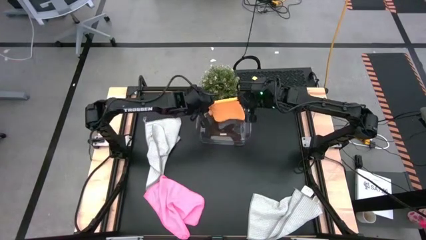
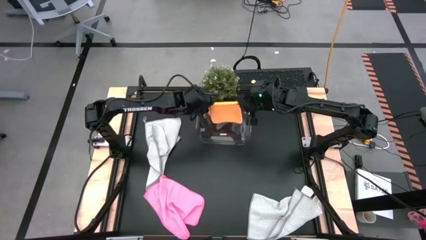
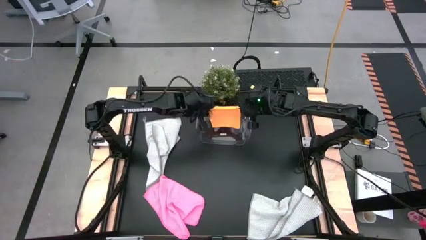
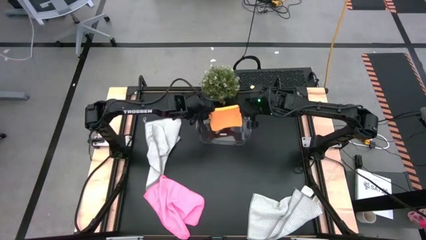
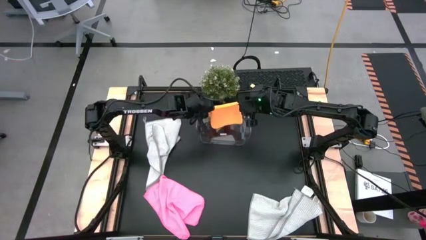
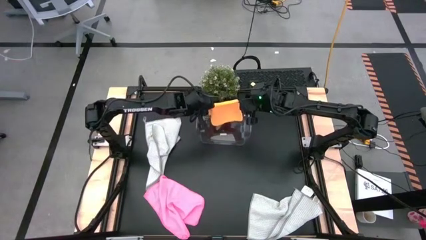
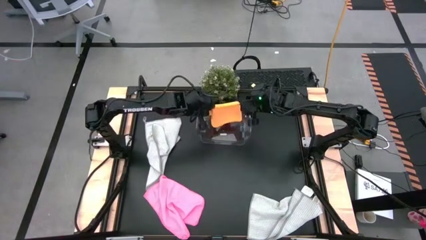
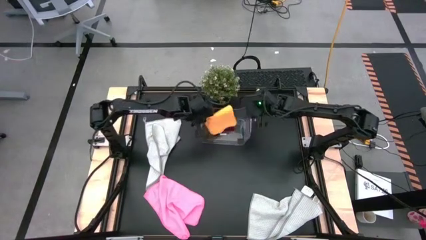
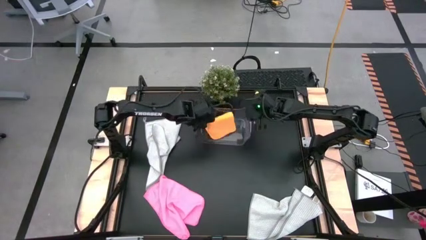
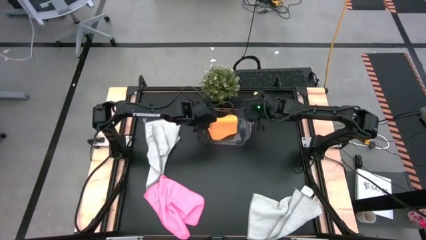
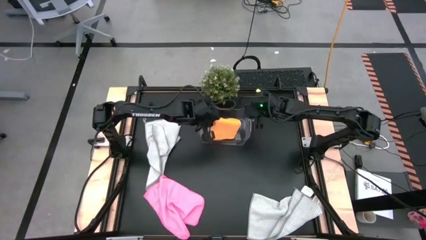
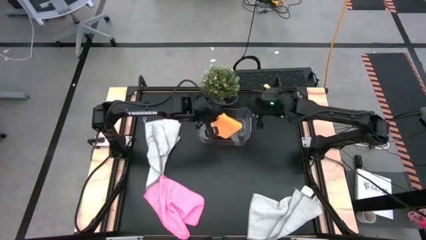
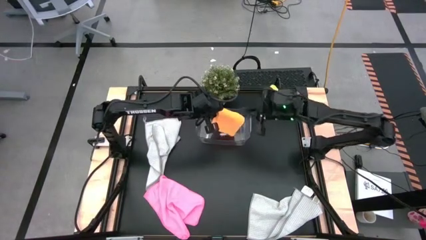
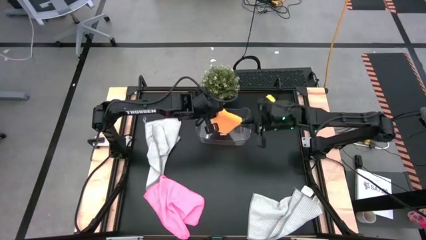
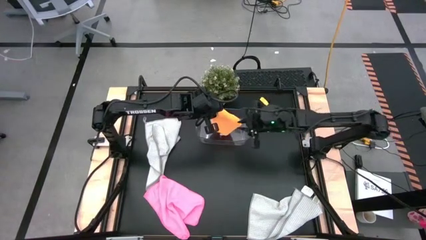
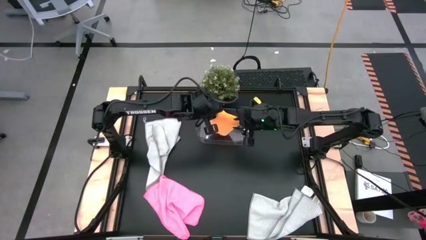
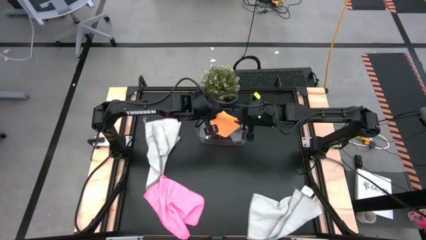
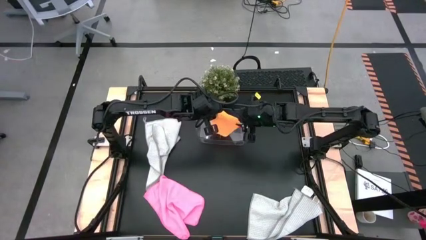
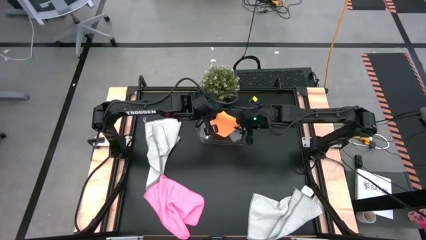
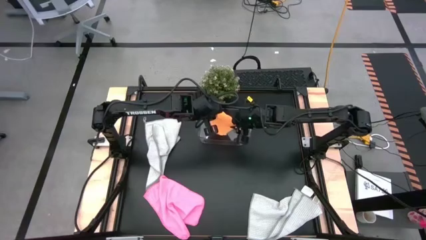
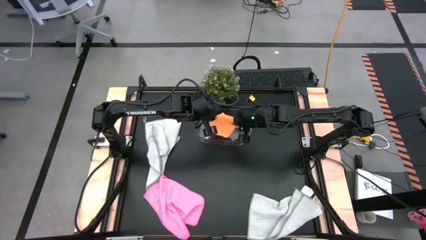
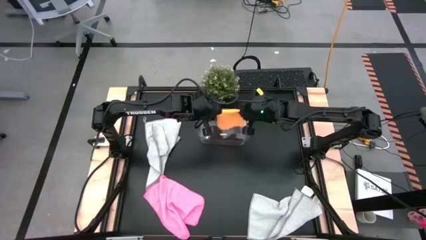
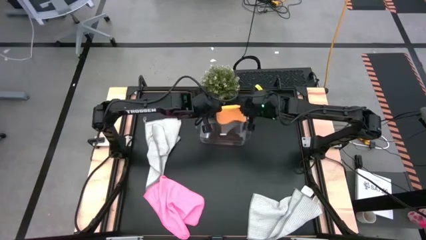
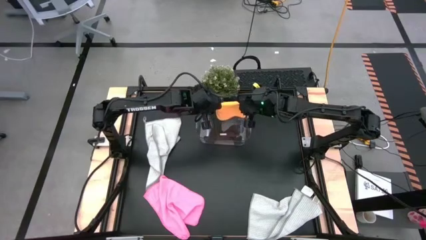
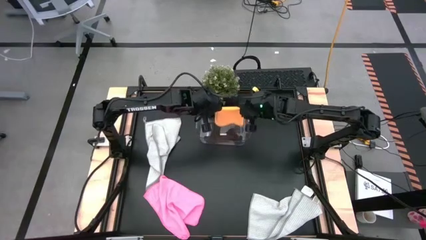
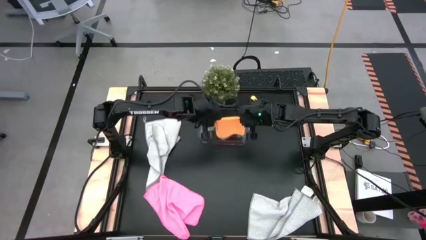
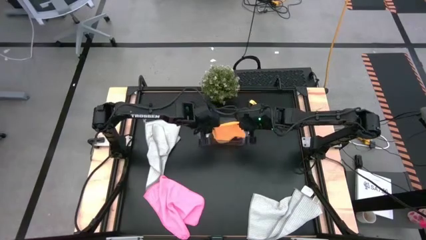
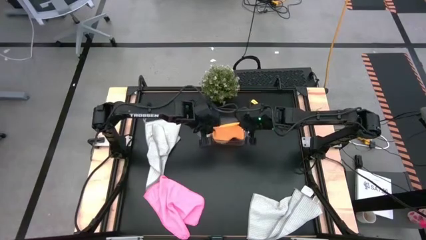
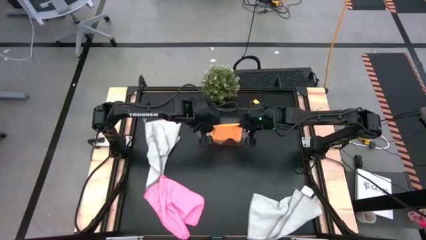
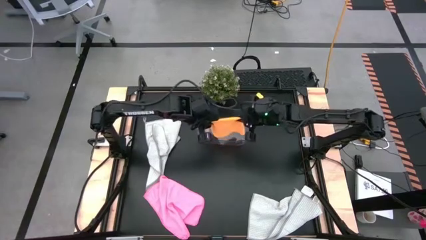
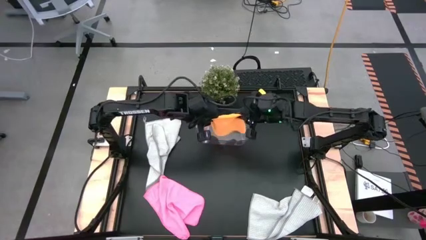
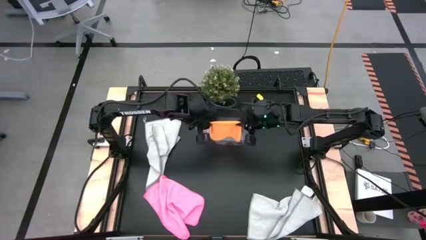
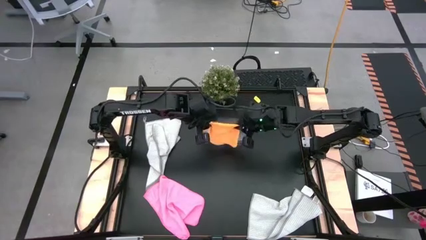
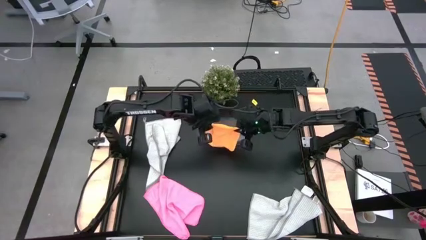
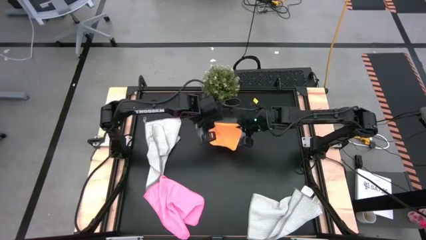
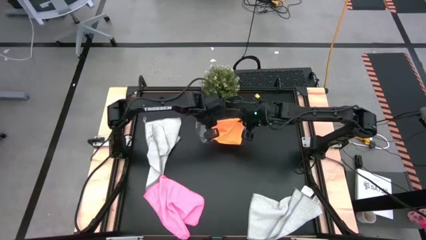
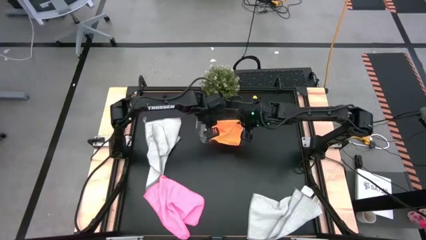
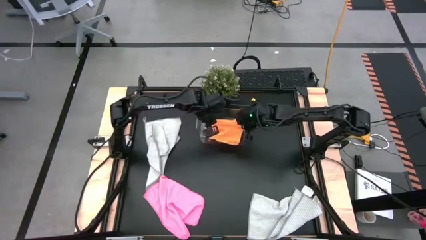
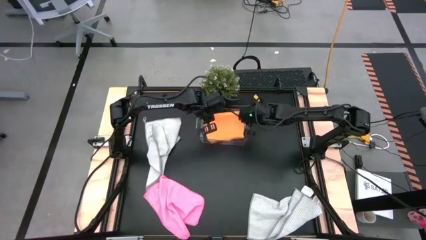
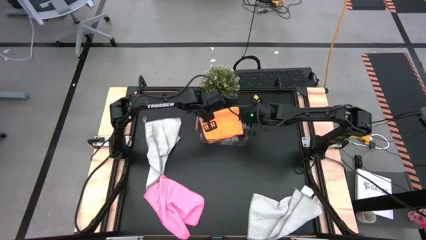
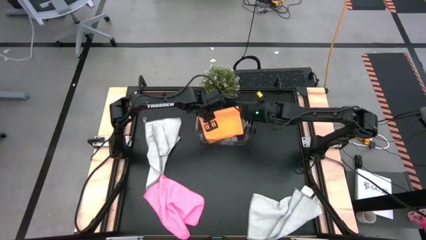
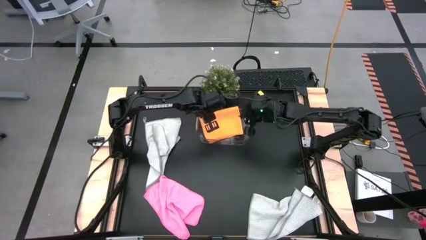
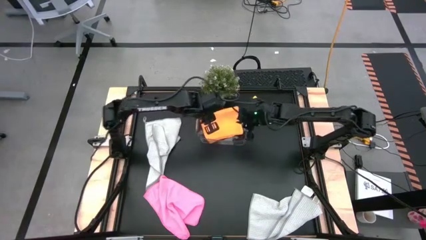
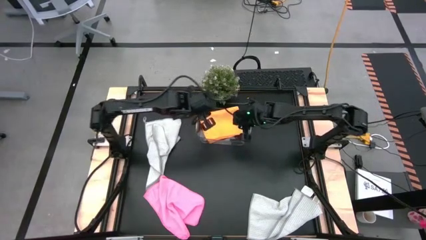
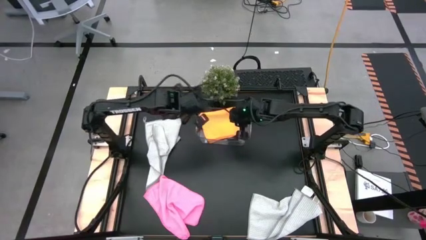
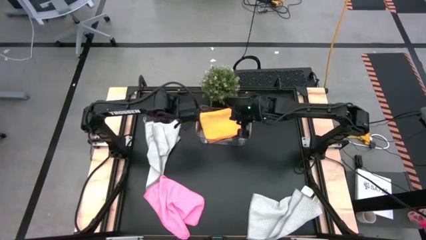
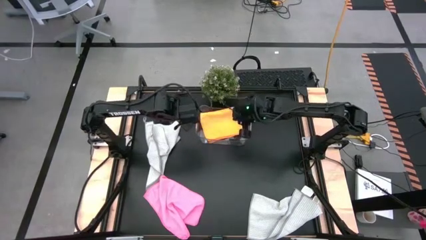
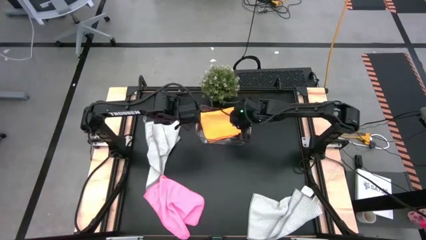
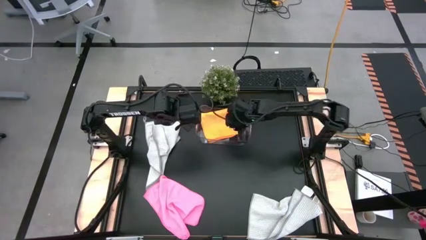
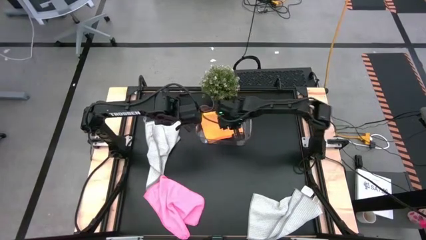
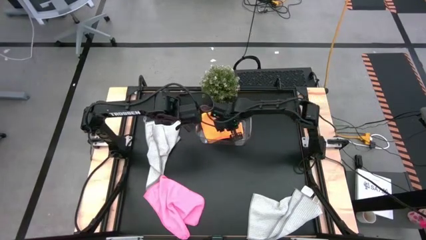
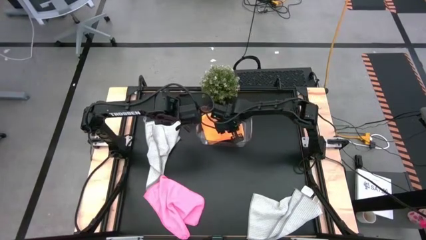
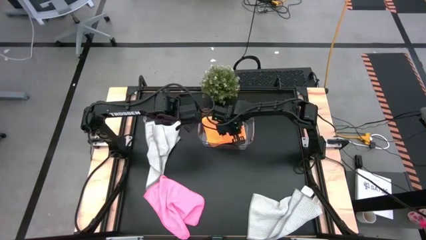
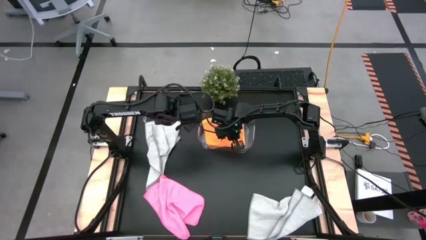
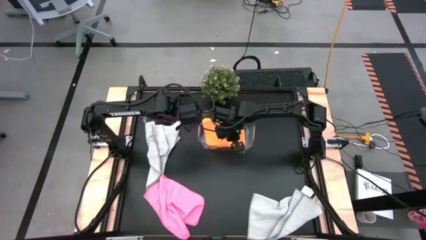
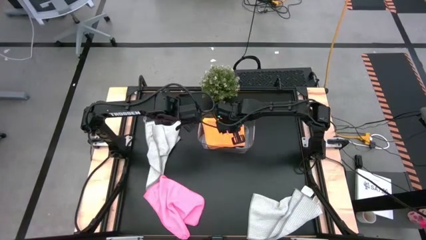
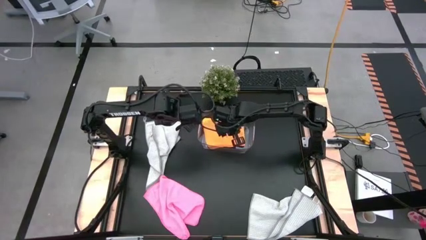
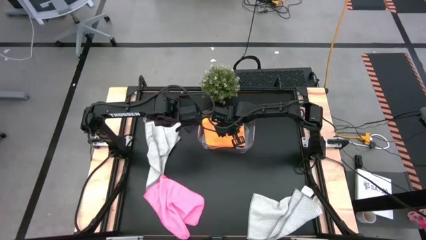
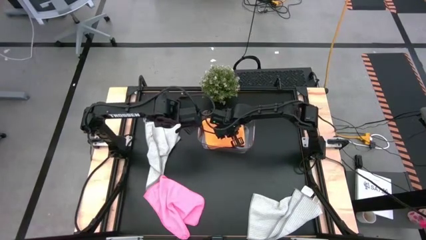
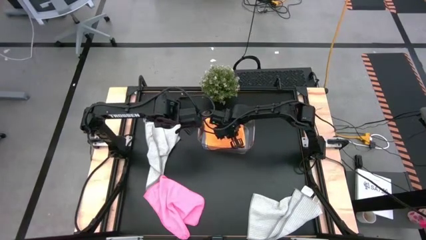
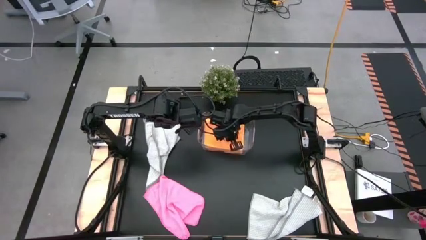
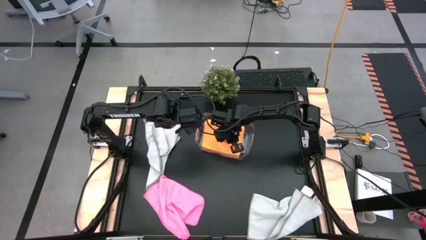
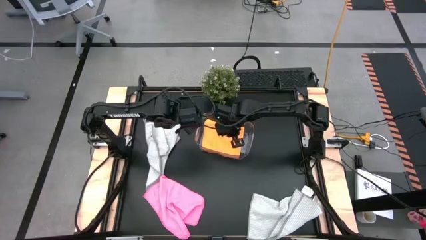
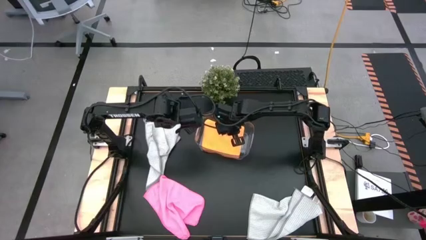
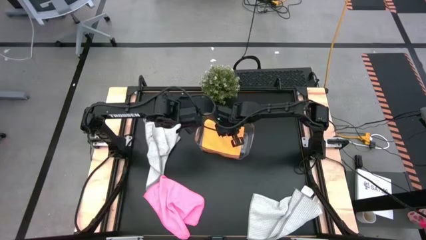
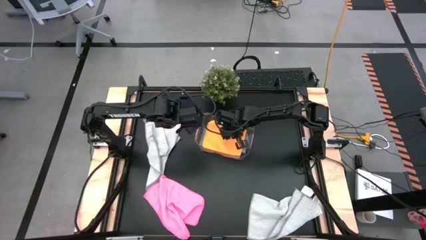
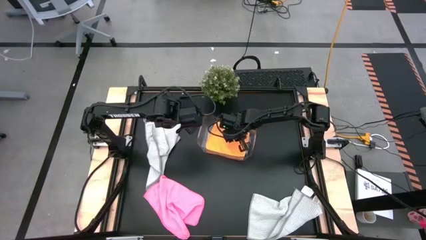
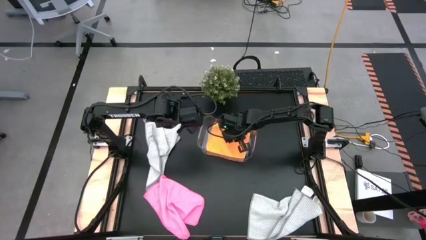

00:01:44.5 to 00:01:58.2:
Task: Fold microfiber towels
Put the orange microfiber towel into the transparent bin

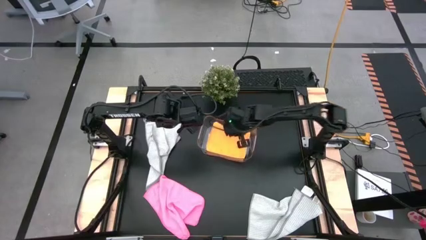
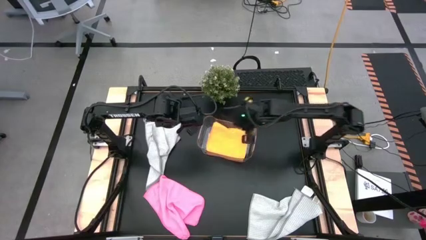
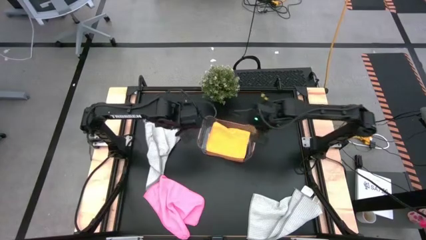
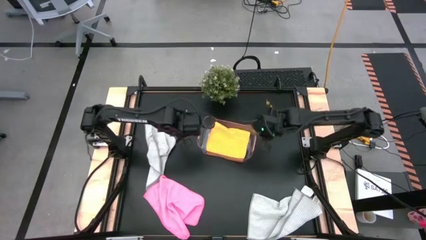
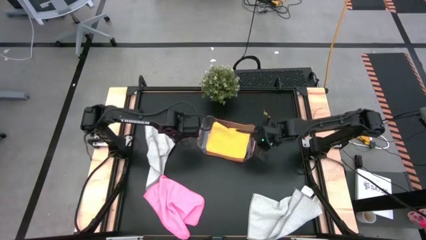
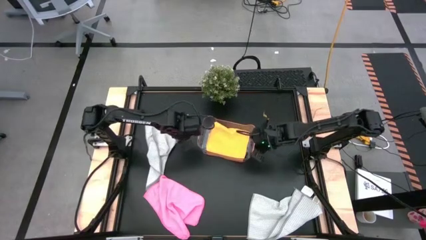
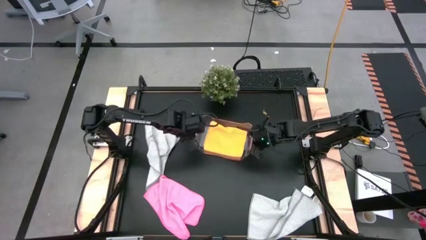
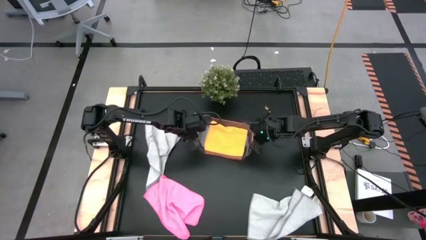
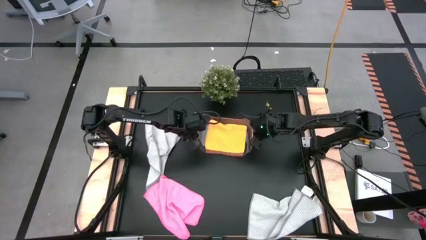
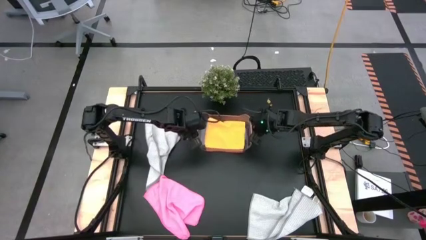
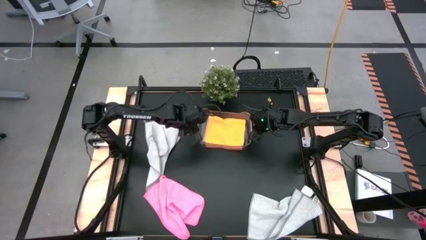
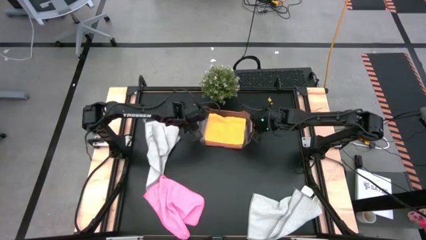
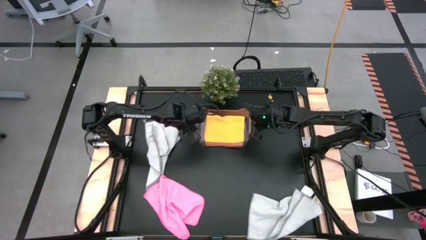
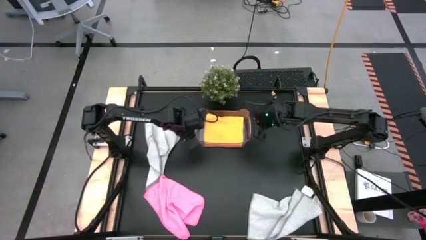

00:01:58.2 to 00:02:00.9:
Adjust the transparent bin
